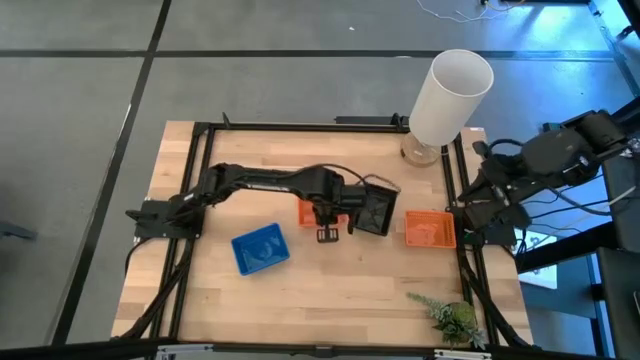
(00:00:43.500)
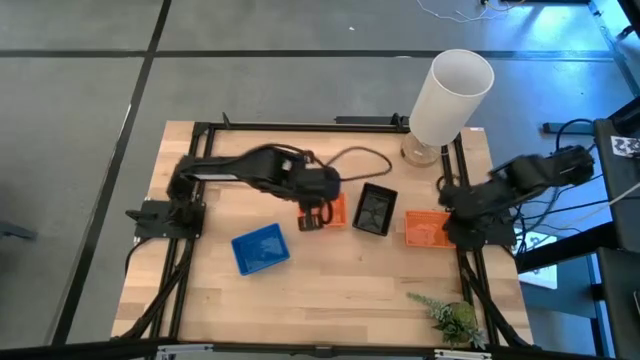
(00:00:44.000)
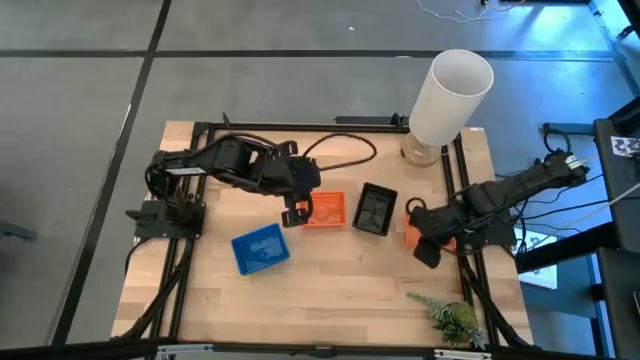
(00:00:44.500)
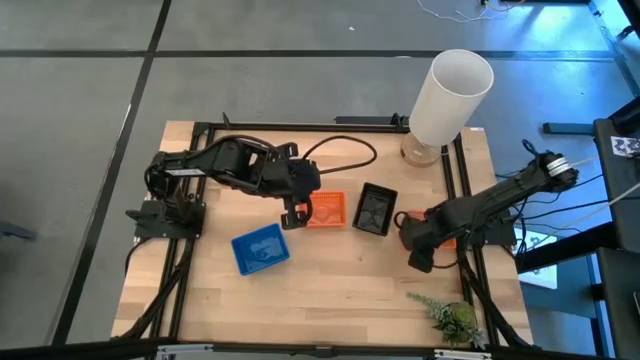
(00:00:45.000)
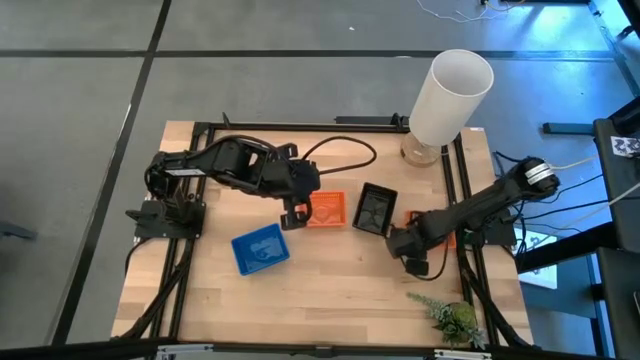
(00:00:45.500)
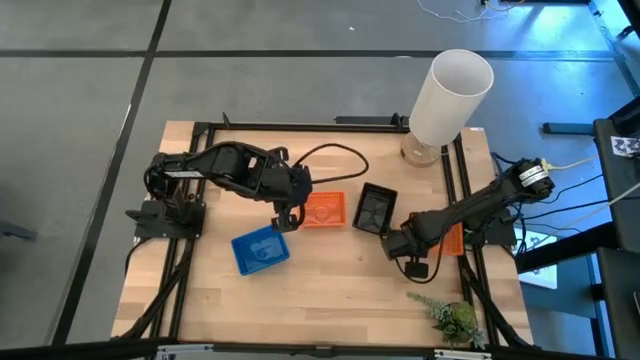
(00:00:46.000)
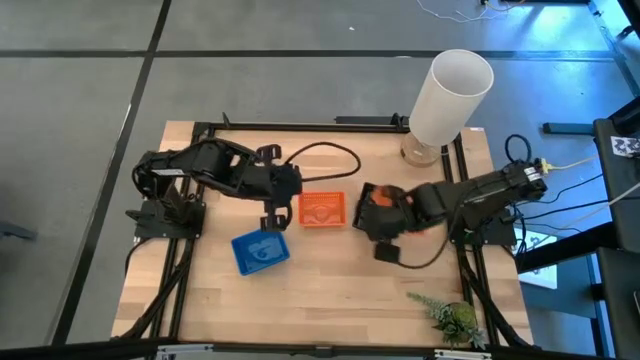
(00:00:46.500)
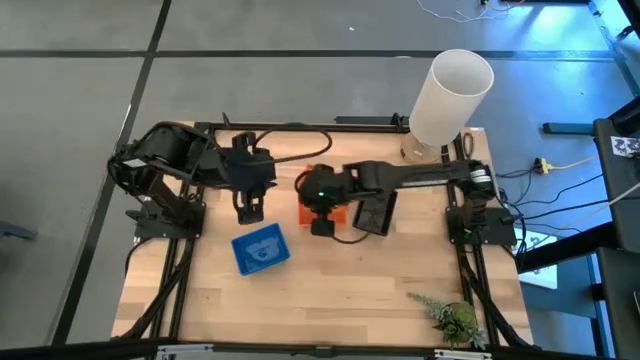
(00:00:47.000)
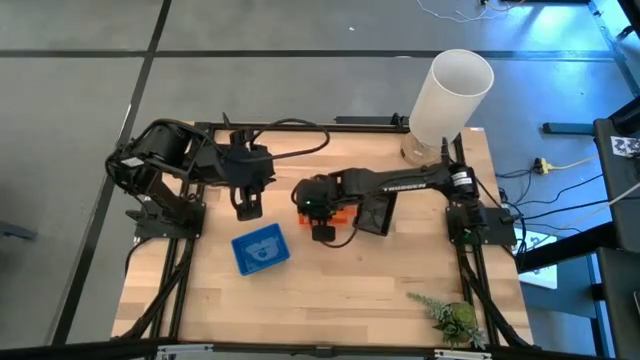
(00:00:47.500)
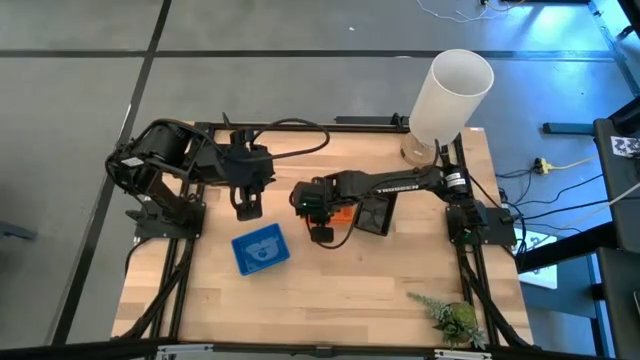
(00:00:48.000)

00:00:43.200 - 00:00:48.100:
Stack the right orange bin on the stacked orange bins

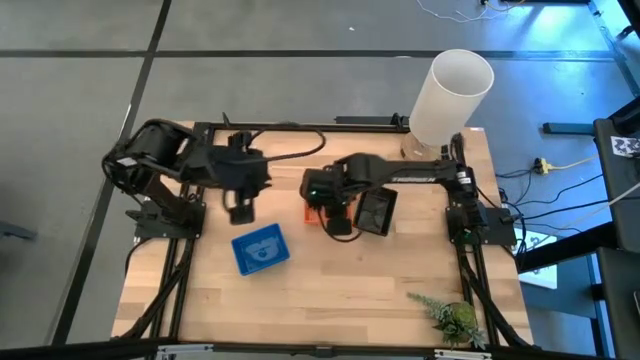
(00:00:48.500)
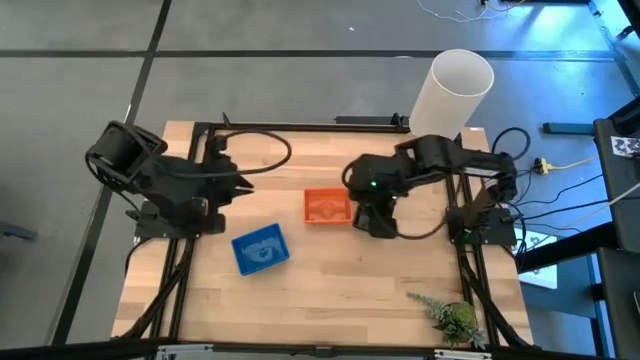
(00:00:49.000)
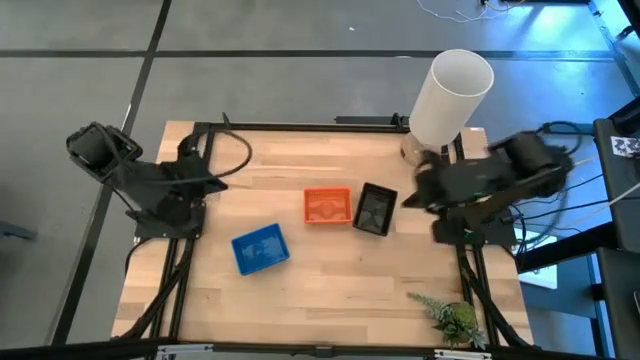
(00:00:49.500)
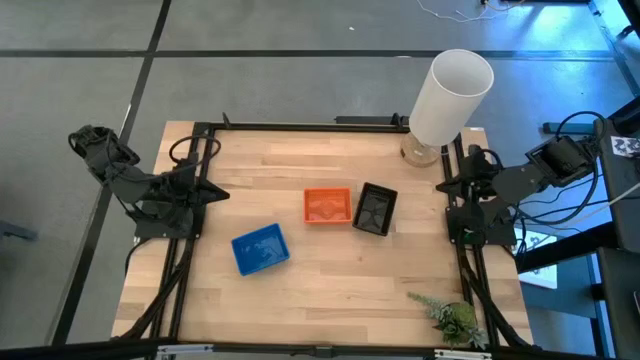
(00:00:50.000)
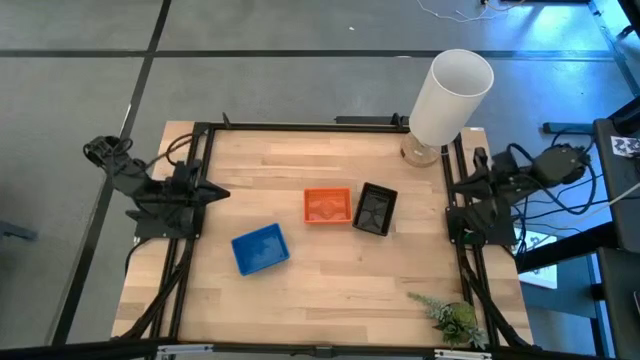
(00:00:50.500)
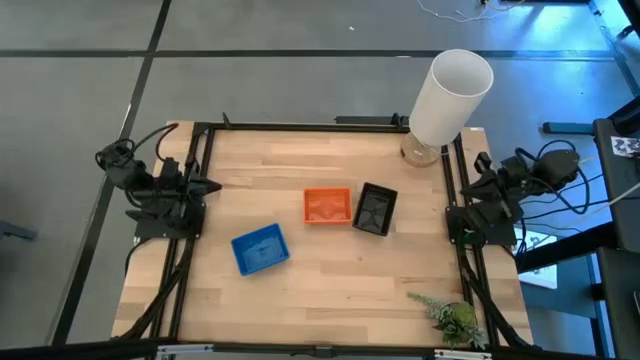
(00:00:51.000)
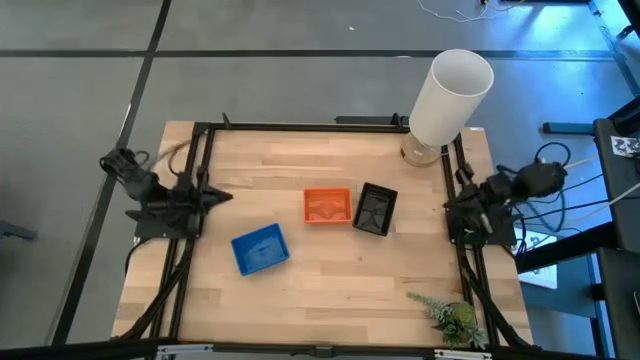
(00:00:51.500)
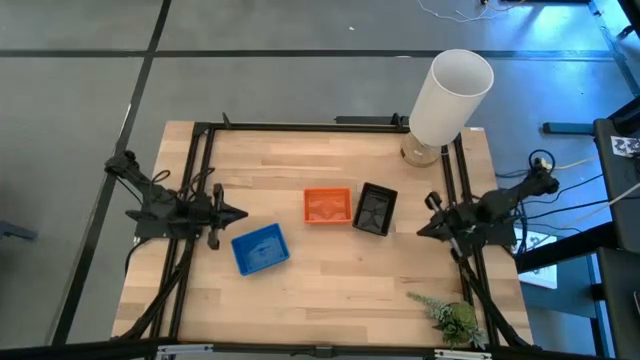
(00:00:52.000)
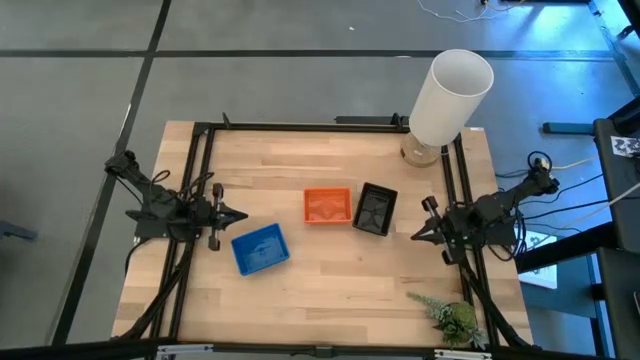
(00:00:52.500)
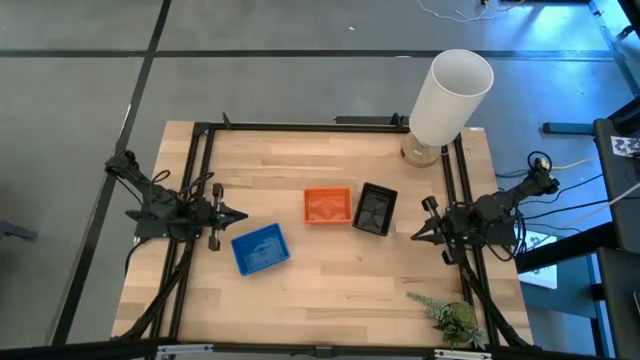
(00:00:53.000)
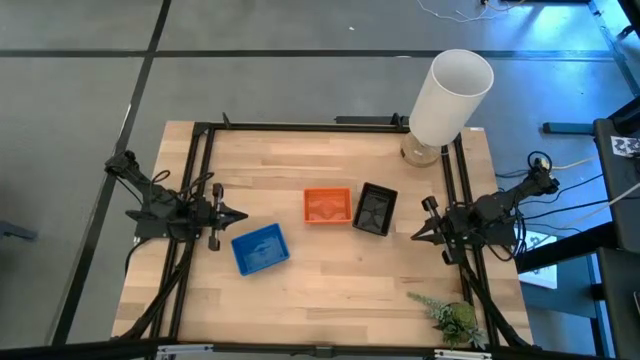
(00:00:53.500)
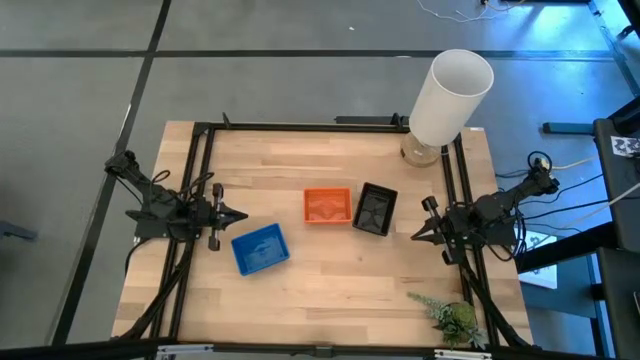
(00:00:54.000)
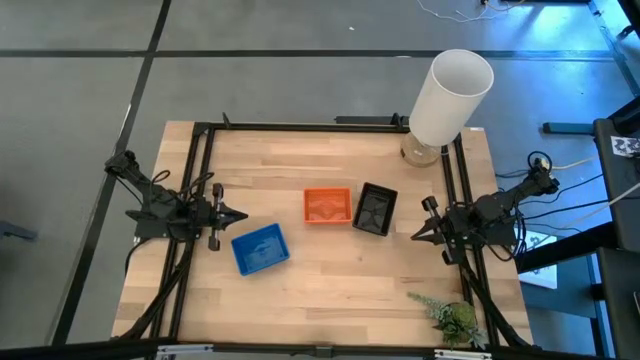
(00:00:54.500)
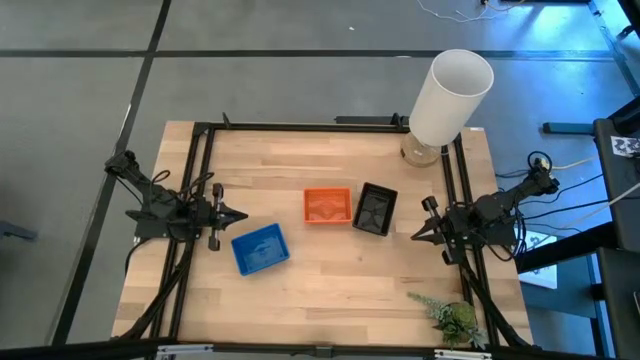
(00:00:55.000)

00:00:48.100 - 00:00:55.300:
Return to Home Position
